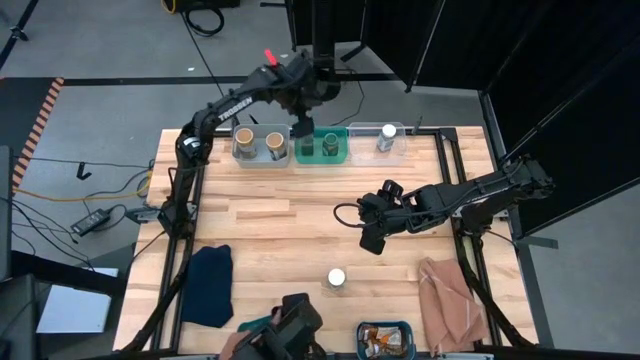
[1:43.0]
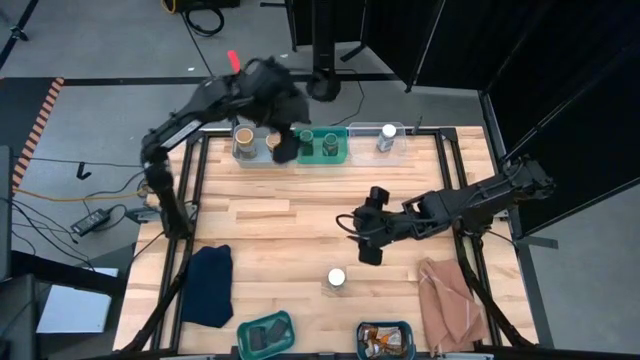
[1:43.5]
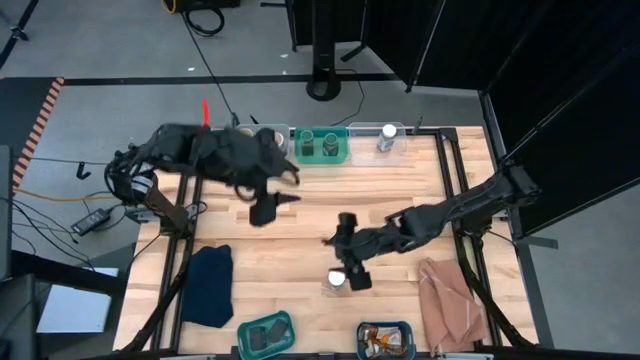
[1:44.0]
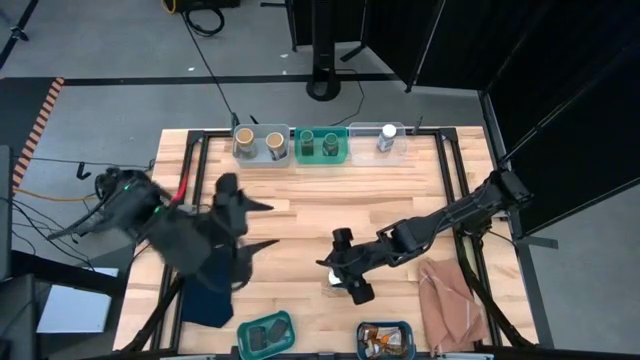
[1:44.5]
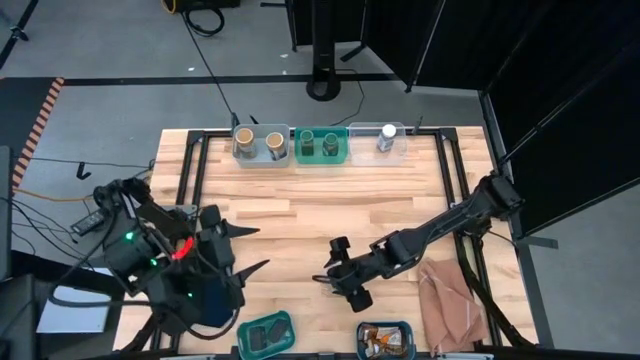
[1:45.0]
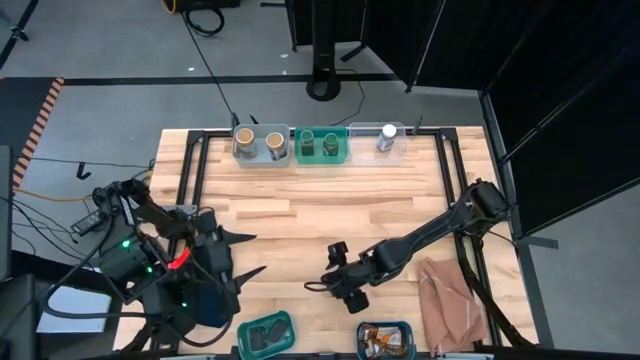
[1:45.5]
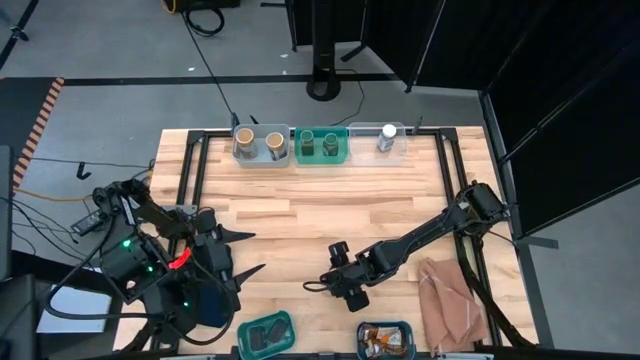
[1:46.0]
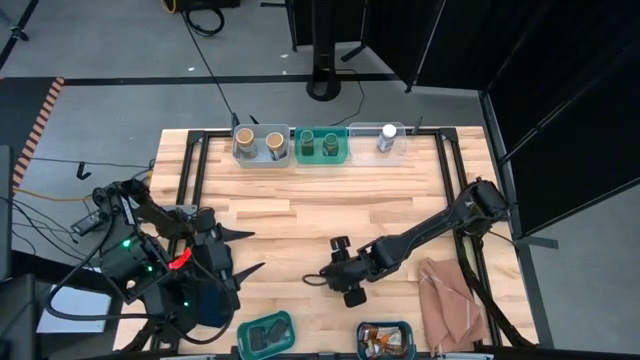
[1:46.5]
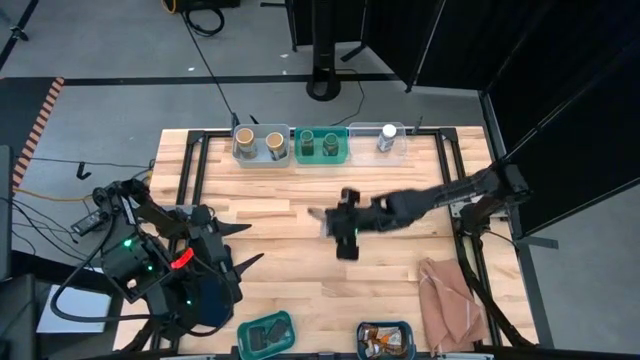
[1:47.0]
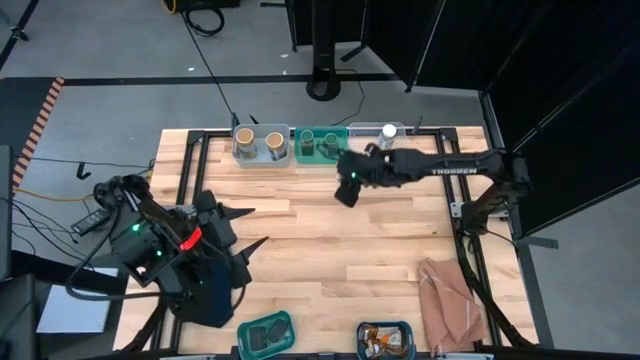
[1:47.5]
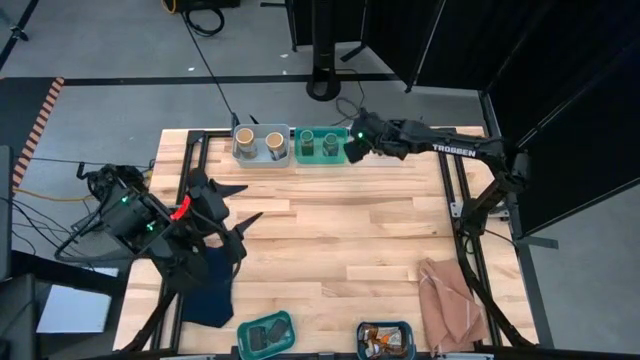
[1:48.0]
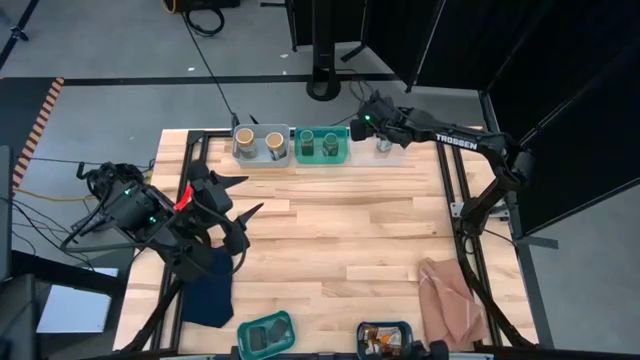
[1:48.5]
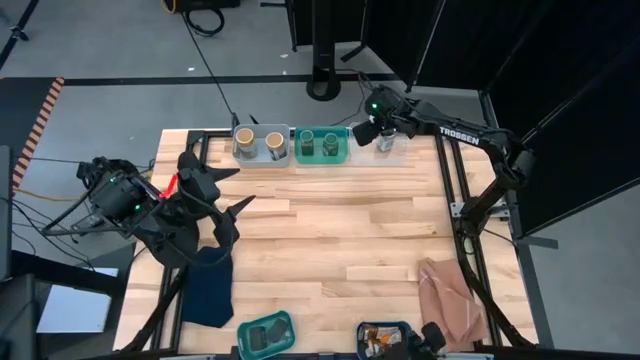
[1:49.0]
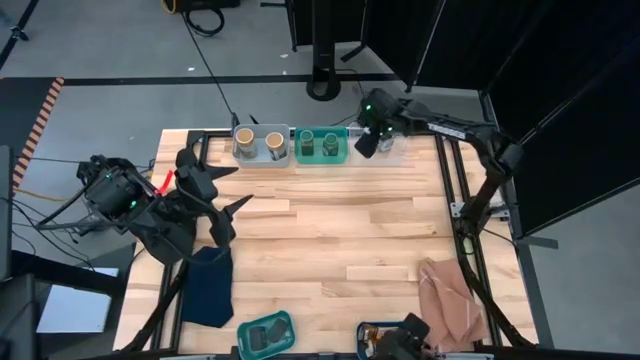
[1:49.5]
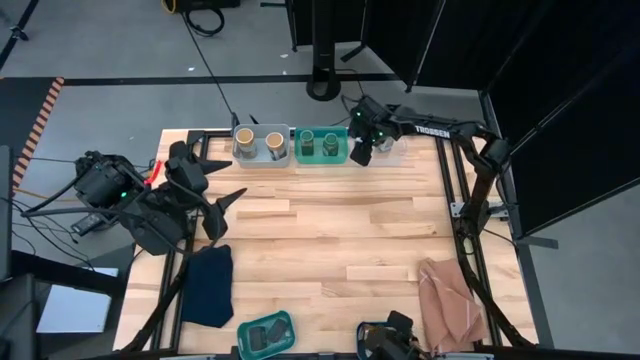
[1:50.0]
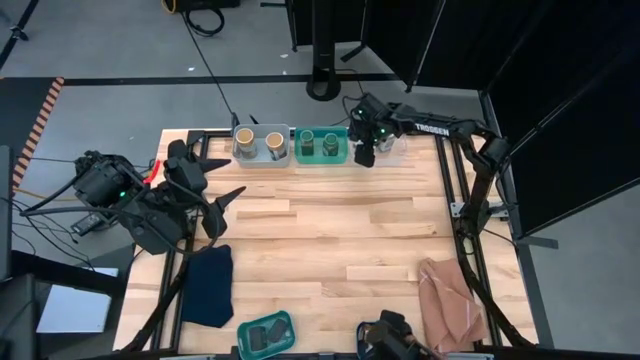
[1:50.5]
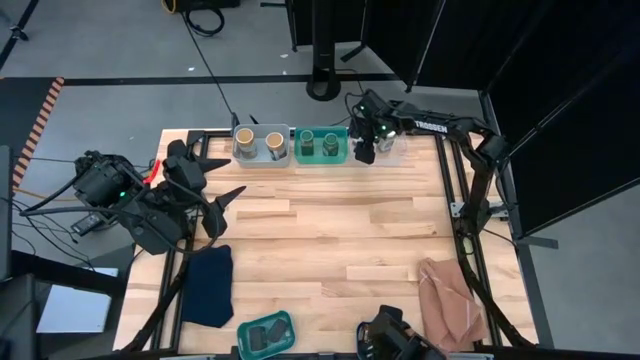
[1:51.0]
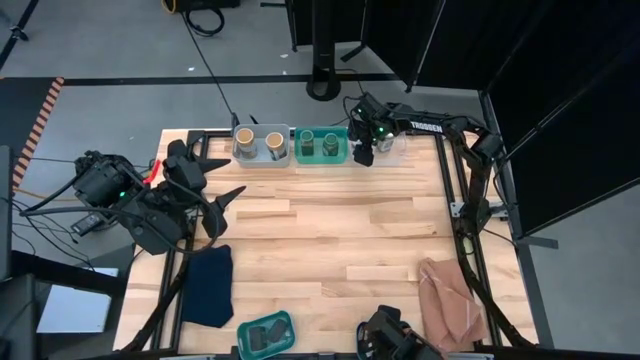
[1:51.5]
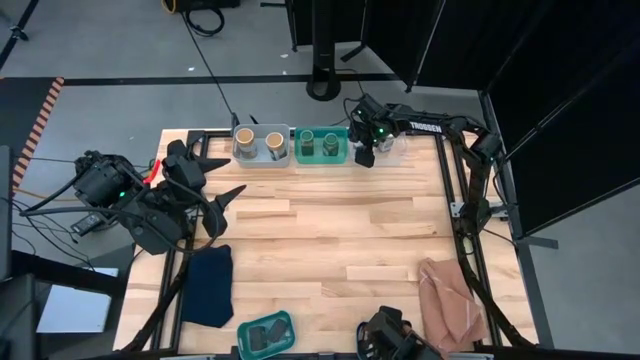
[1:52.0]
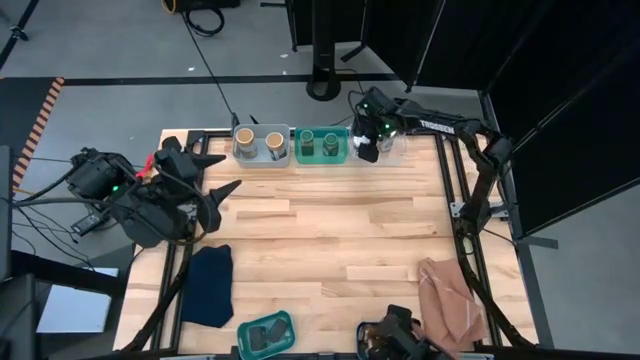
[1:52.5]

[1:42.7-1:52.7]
Task: Sort spices by type
Put the white seasoning bottle into the transparent bin

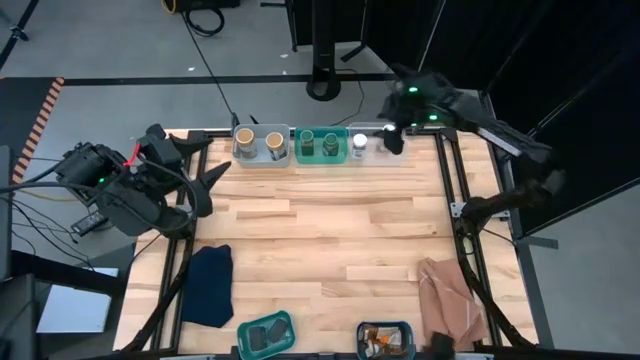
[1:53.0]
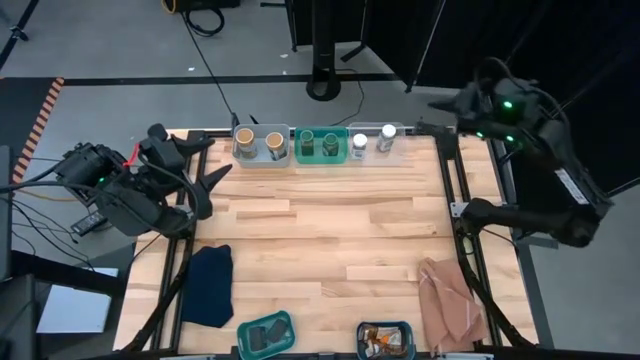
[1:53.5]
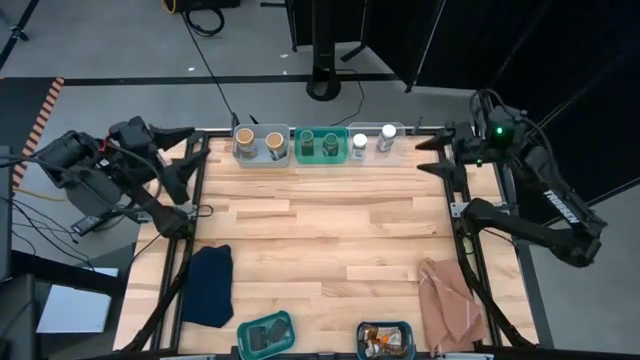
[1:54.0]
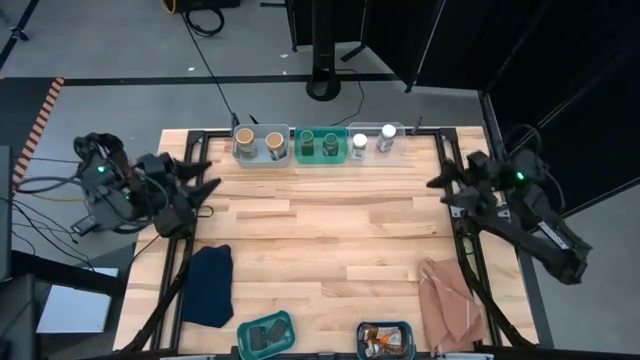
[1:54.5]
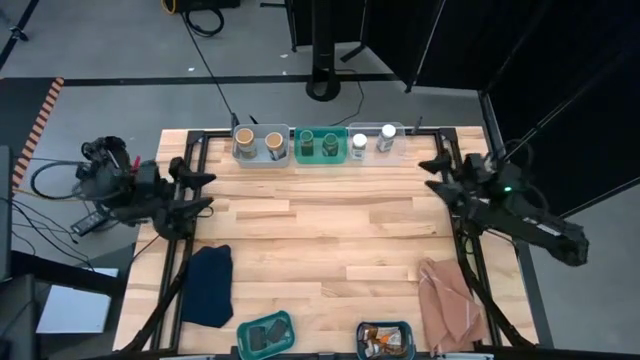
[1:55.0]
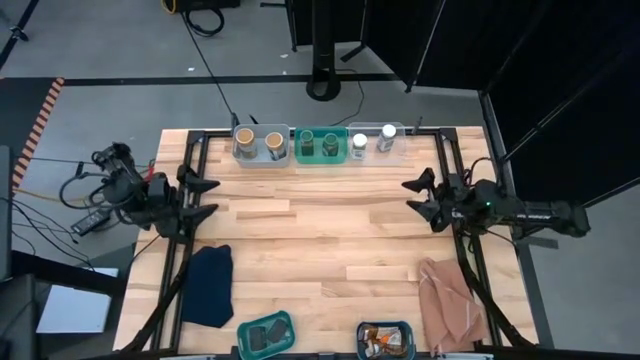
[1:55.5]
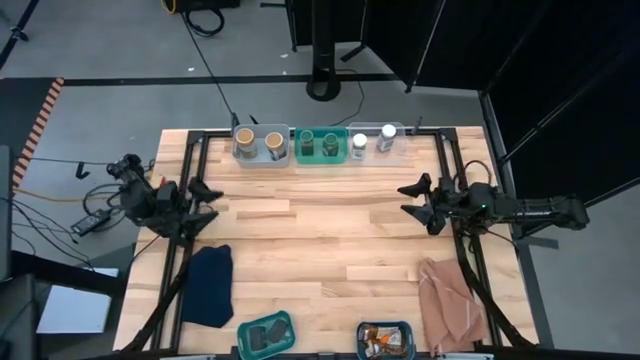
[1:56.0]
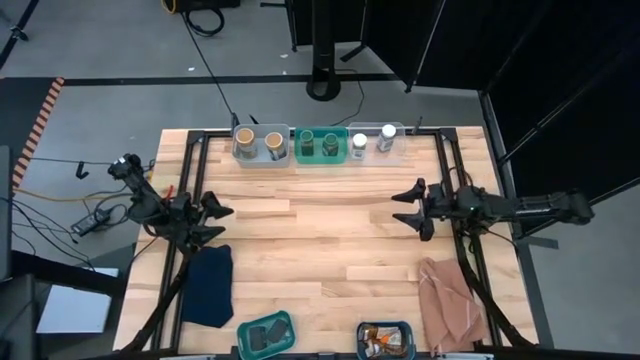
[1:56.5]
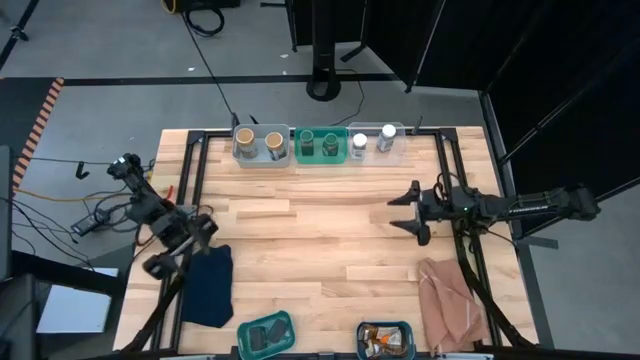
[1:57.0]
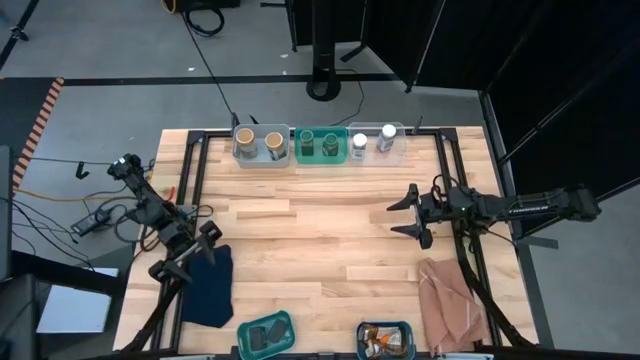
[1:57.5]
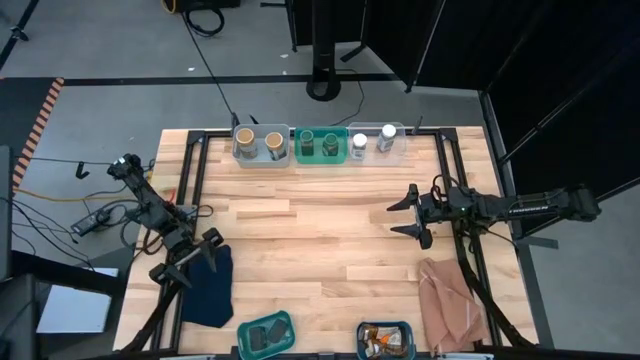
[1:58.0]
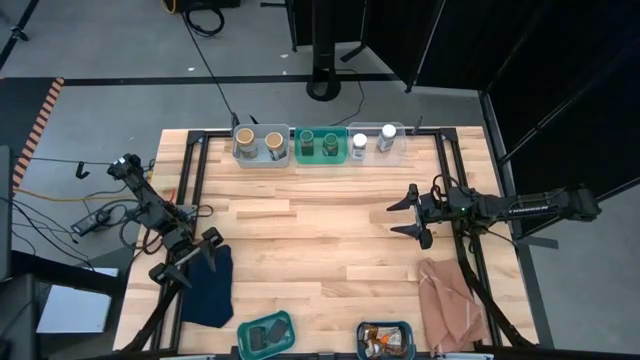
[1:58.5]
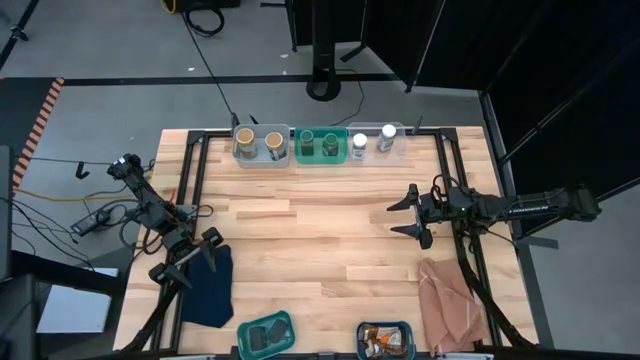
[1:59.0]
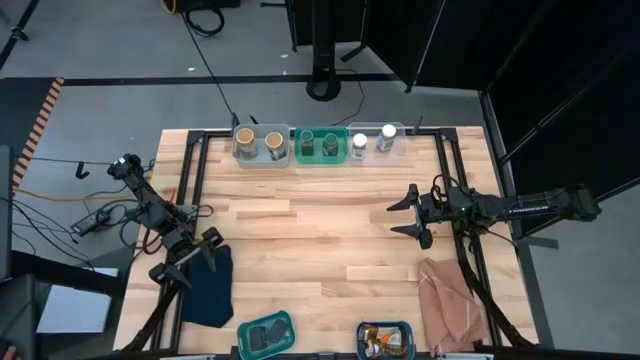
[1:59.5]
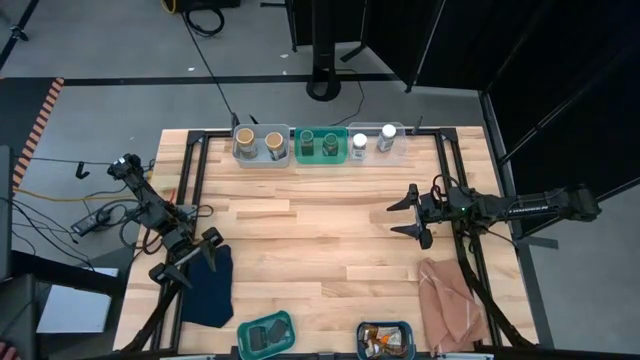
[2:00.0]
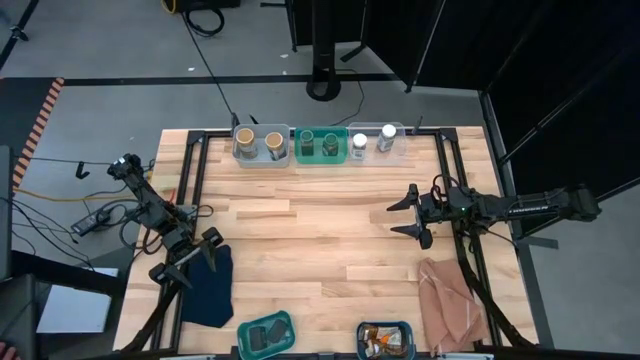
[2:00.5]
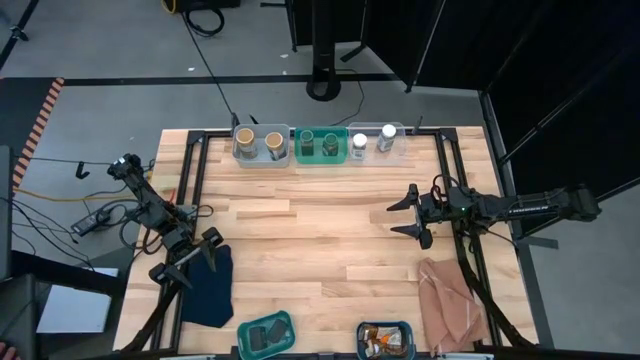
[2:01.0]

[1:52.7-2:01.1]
Return to Home Position

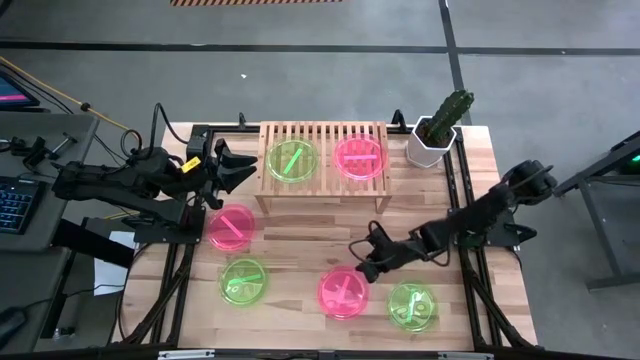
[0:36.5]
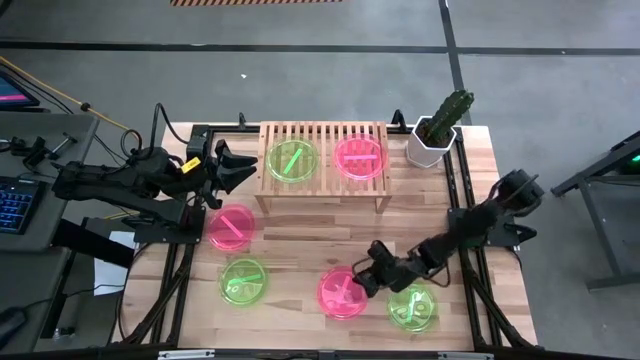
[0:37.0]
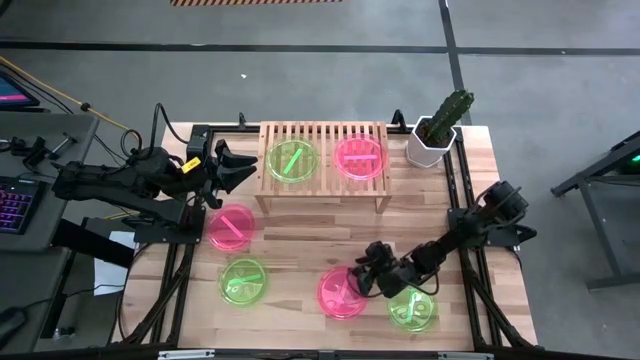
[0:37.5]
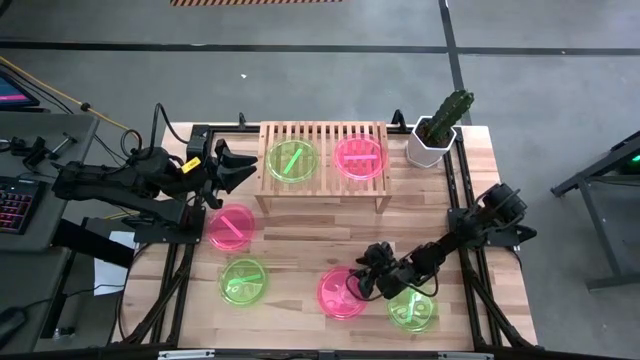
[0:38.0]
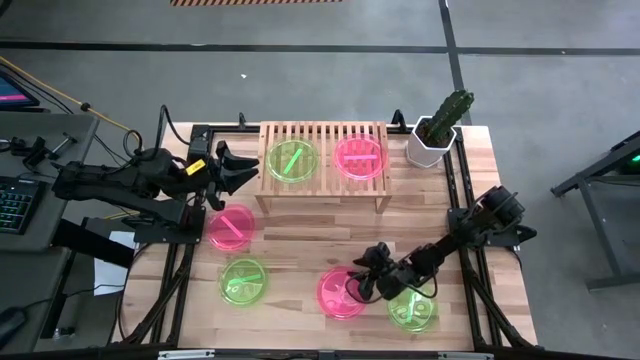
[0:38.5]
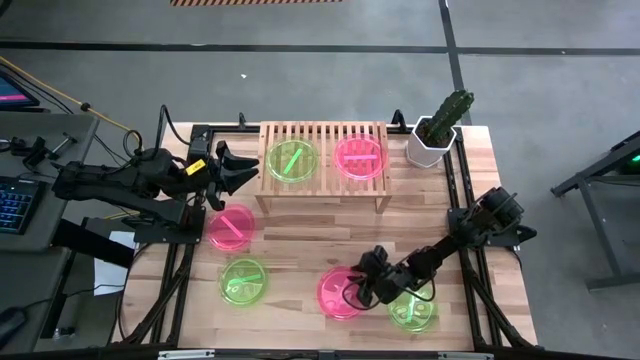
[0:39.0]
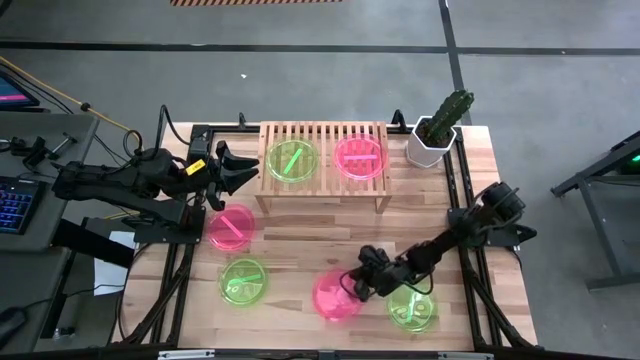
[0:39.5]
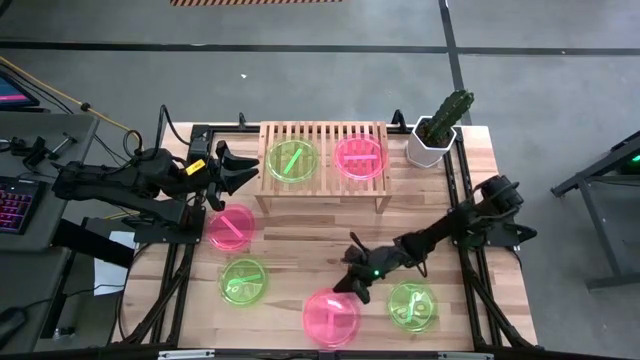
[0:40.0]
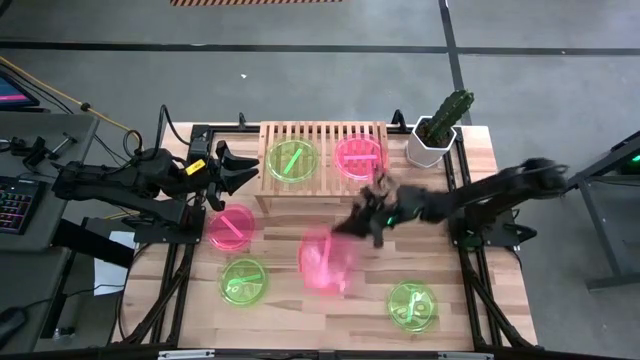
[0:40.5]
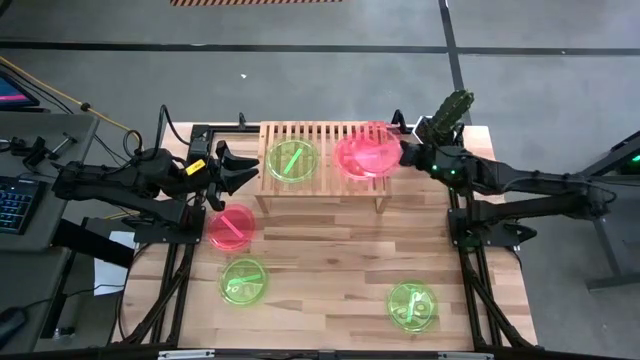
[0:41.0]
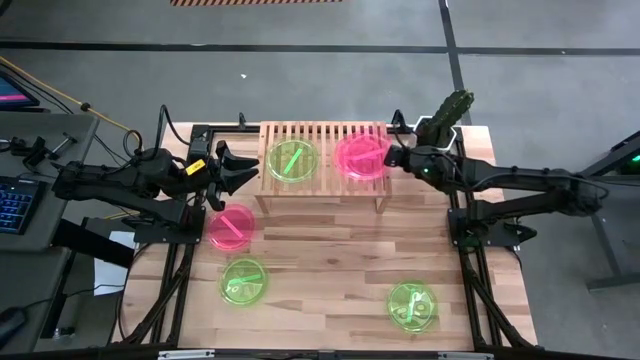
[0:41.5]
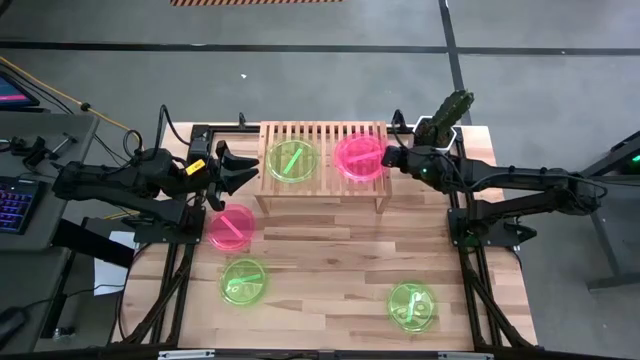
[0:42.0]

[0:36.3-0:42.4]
Task: Place and stack plates onto a shelf
Stack the right pink transparent plate on top of the pink transparent plate on the shelf
